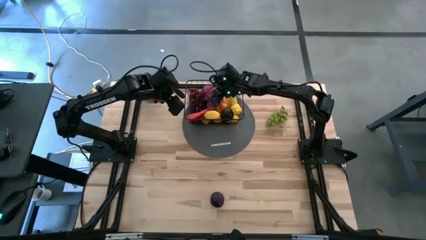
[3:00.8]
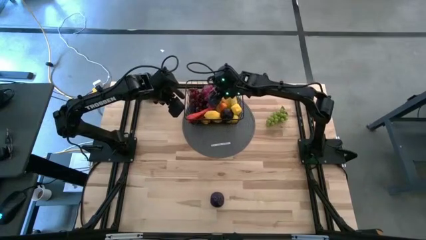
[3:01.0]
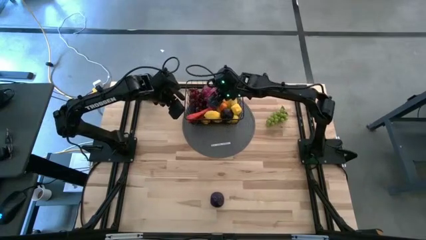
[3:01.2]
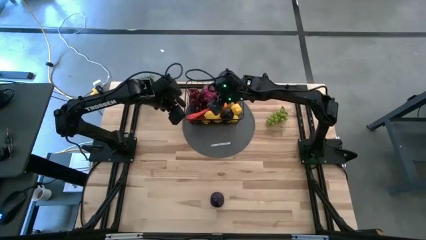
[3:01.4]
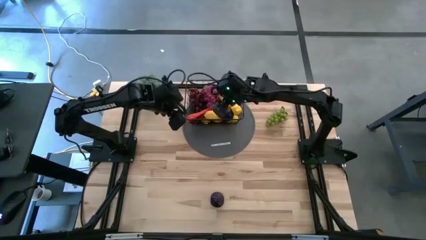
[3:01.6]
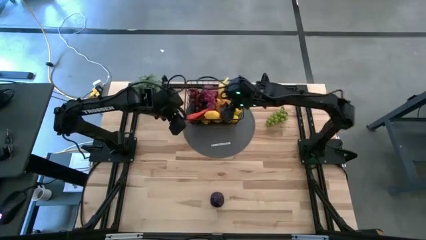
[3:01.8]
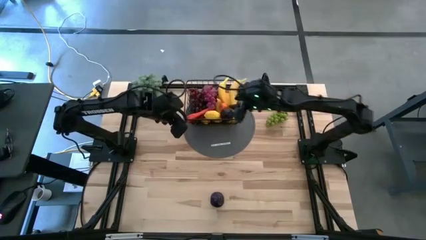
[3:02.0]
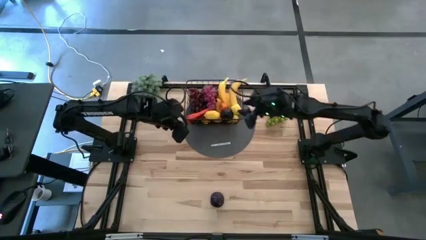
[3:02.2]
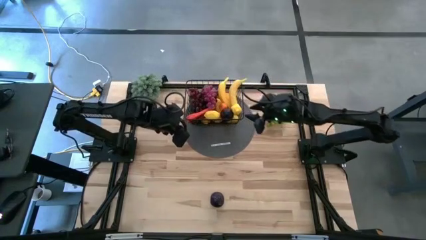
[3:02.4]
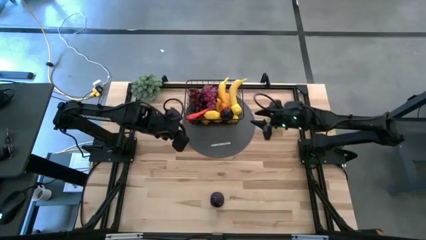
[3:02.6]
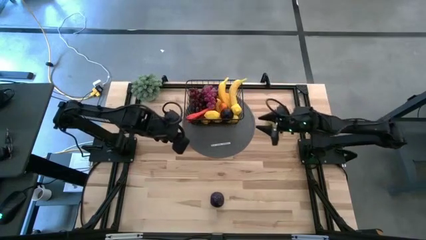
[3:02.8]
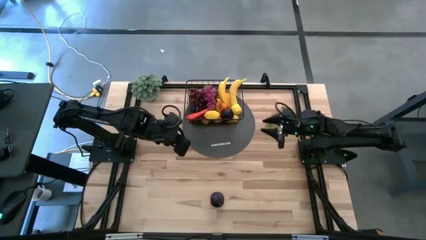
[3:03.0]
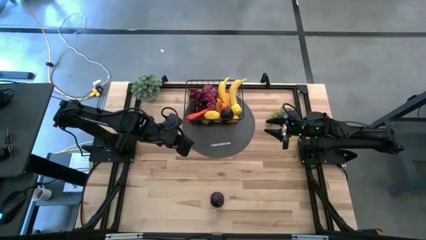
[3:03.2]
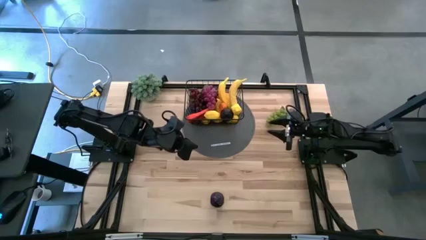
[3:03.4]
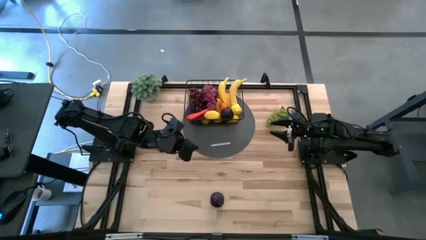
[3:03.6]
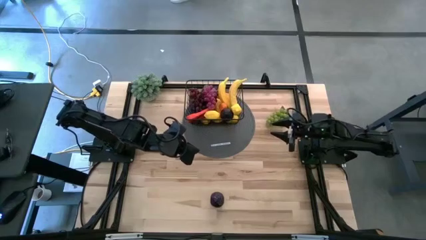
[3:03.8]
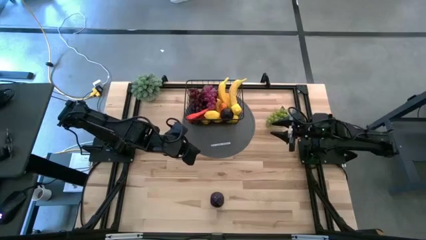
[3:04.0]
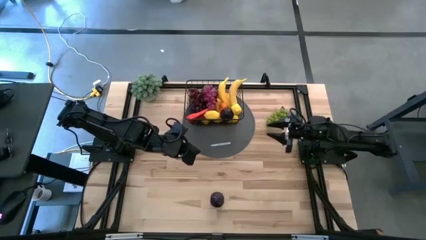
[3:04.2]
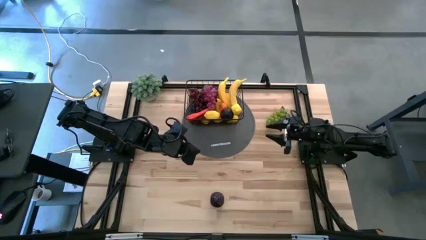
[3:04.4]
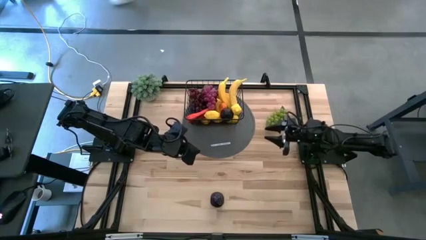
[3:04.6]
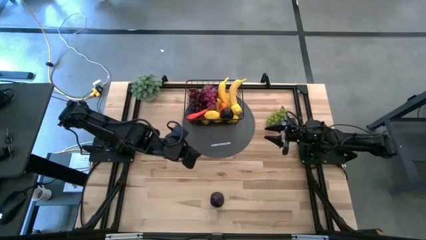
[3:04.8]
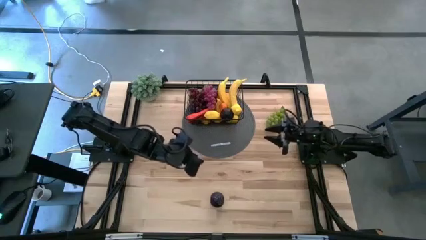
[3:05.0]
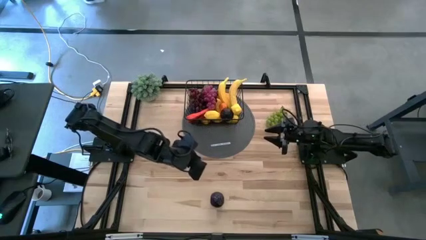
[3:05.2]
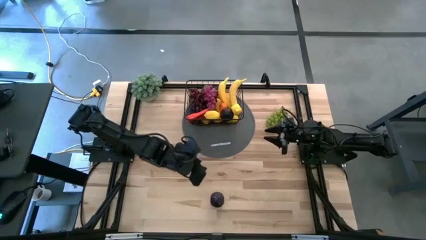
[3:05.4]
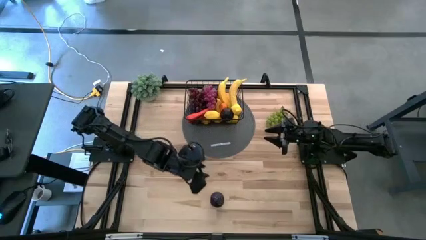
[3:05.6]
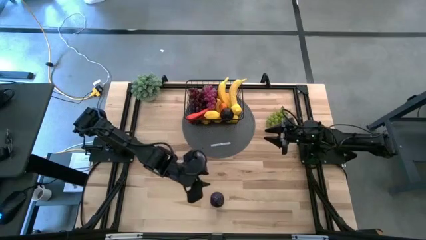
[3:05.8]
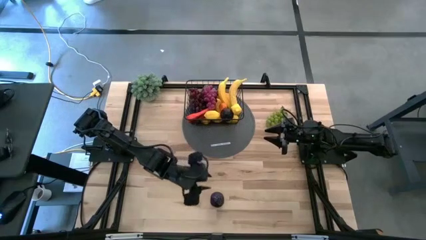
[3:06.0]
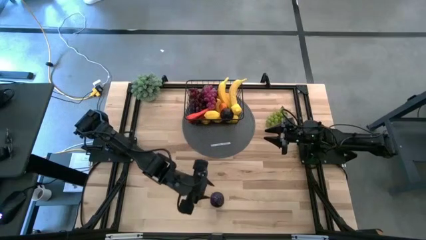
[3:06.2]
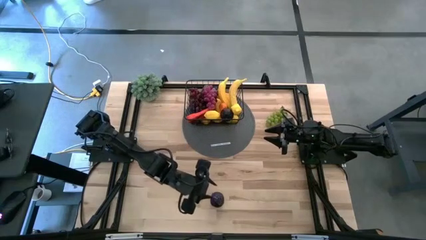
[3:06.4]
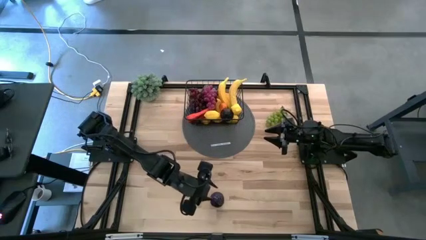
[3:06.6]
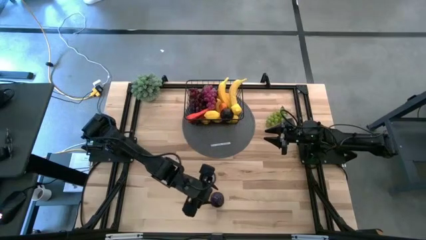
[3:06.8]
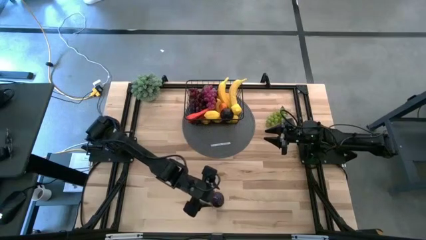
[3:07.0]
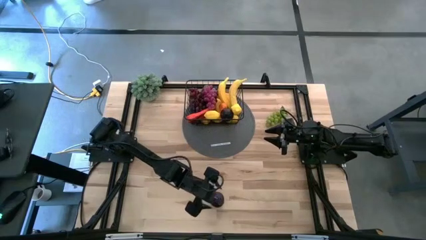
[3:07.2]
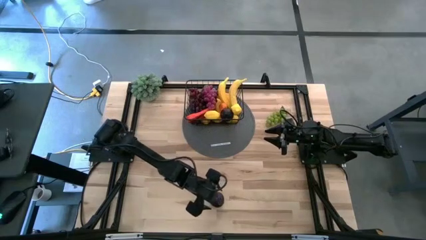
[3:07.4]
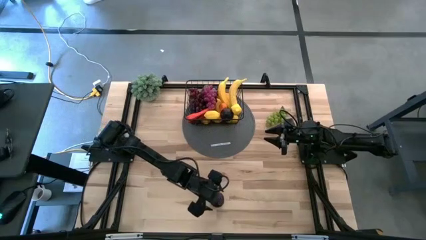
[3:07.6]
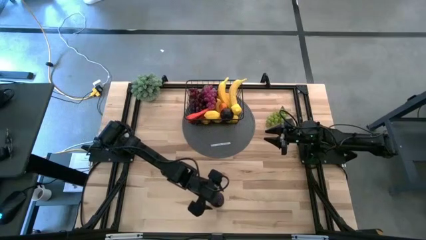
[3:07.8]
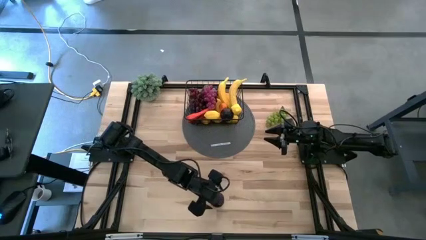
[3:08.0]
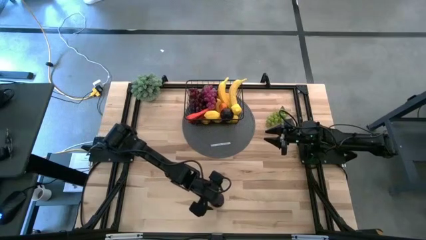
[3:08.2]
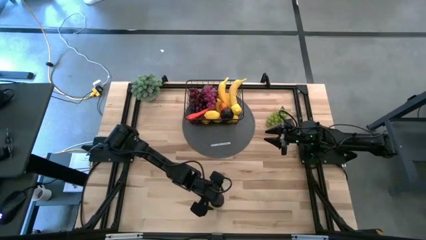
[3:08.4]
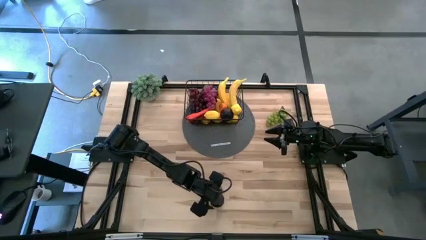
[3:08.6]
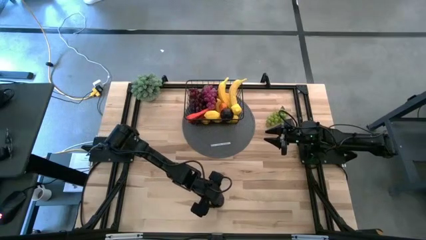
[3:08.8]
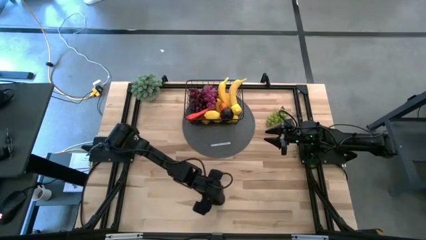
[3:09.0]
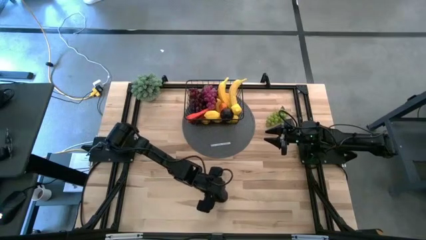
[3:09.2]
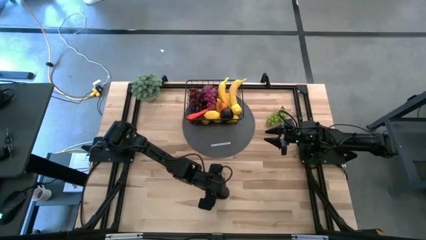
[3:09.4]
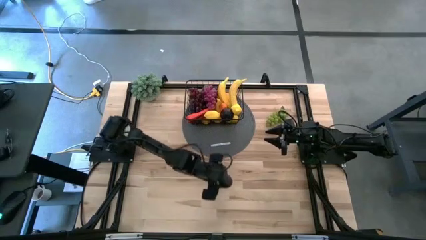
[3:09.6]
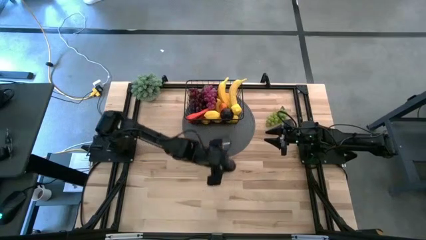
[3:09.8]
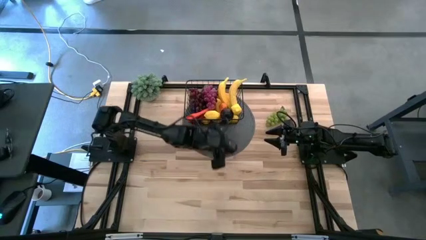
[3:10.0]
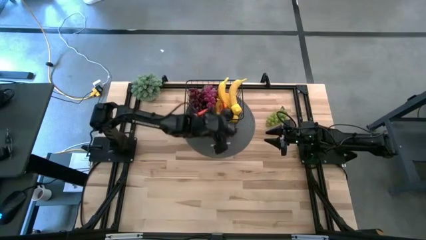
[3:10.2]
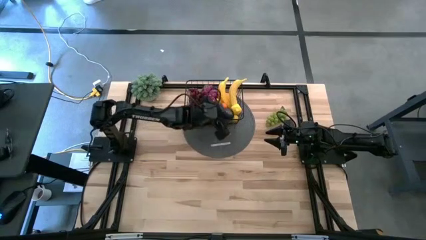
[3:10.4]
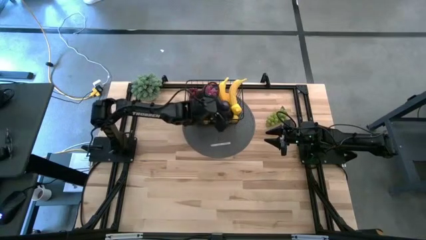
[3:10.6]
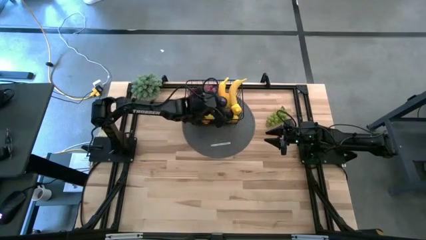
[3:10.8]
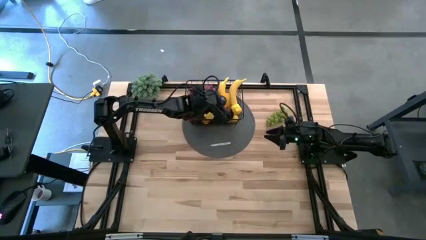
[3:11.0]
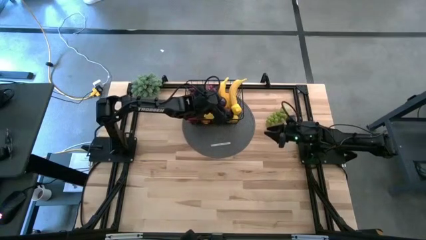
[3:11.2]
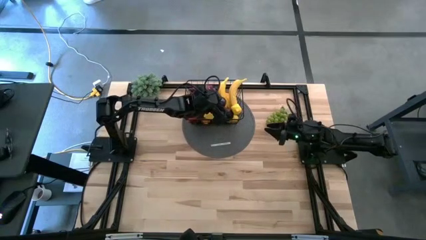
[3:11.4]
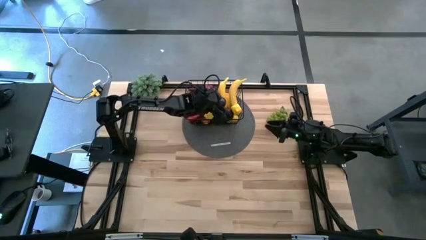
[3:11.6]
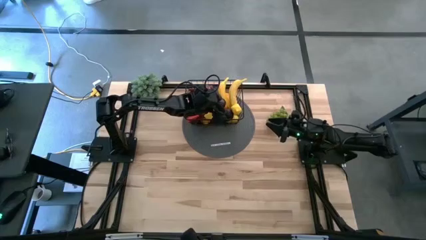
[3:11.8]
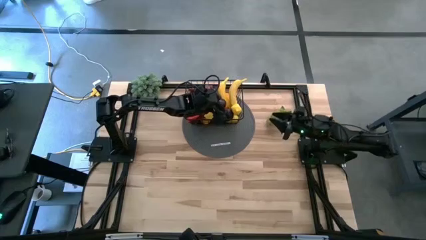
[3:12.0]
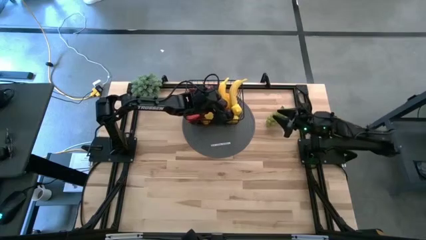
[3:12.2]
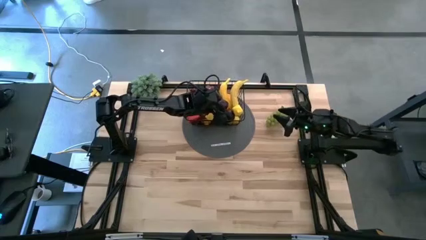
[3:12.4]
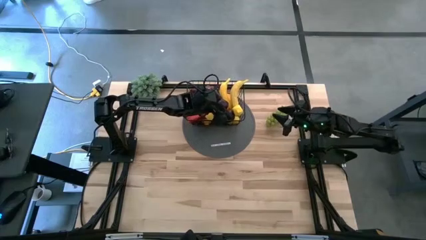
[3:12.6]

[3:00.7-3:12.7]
Task: Build produce basket
Put the purple plum into the black wire basket
